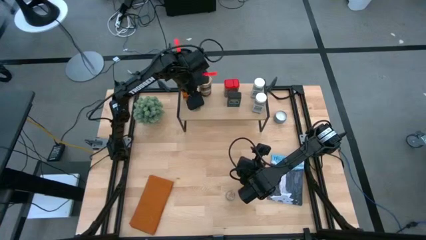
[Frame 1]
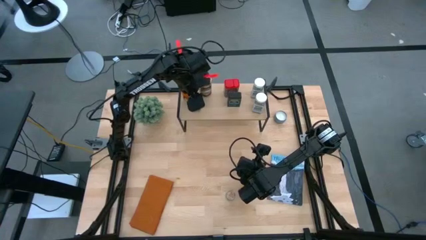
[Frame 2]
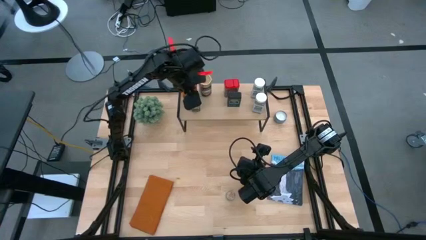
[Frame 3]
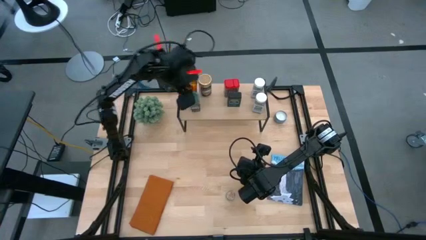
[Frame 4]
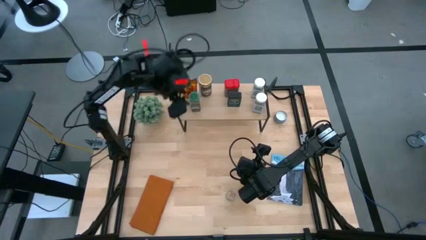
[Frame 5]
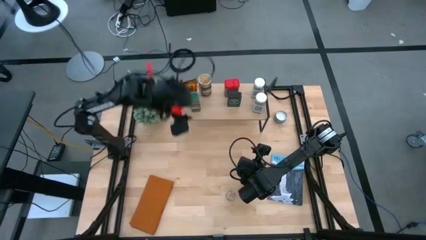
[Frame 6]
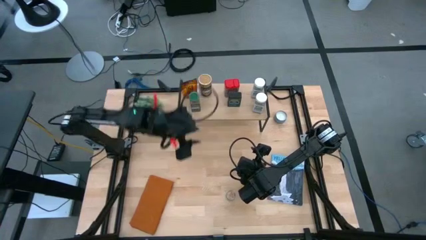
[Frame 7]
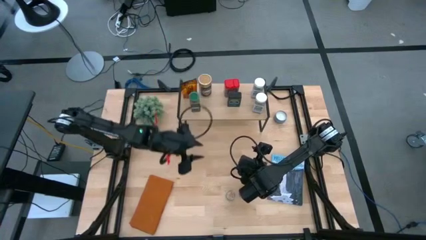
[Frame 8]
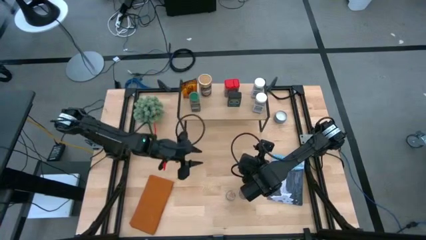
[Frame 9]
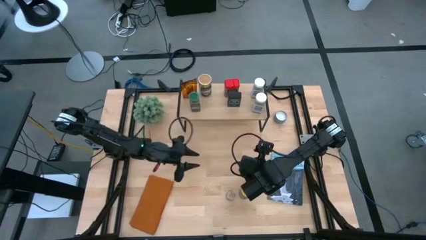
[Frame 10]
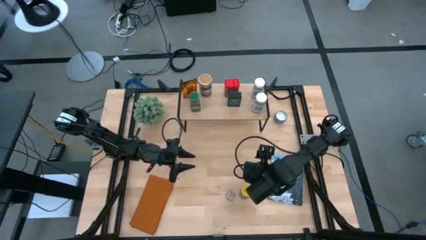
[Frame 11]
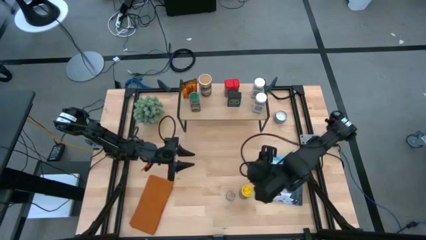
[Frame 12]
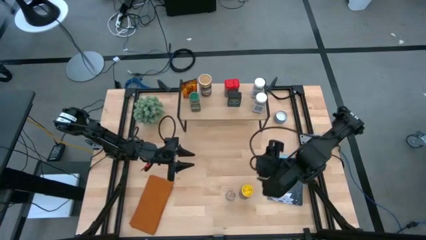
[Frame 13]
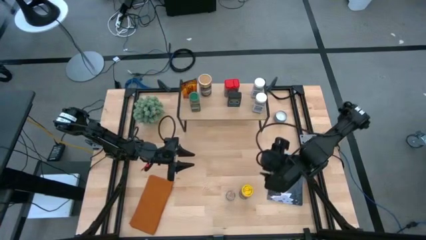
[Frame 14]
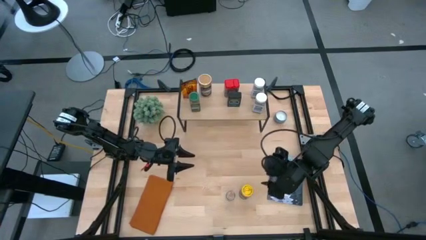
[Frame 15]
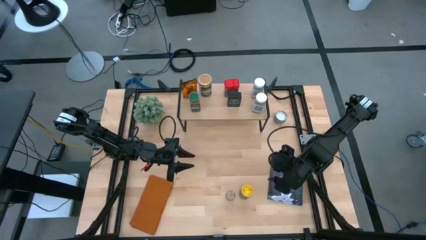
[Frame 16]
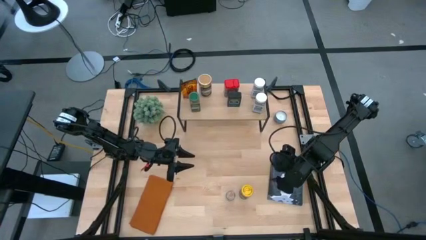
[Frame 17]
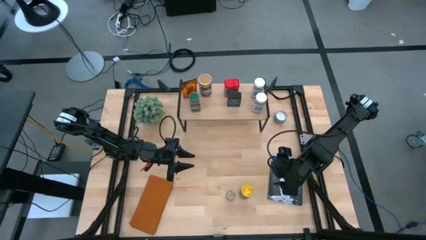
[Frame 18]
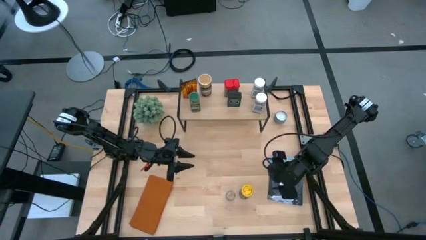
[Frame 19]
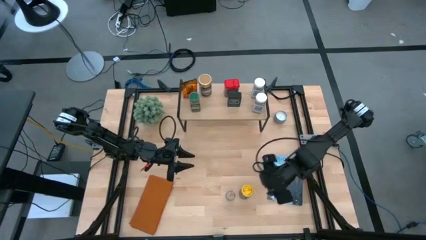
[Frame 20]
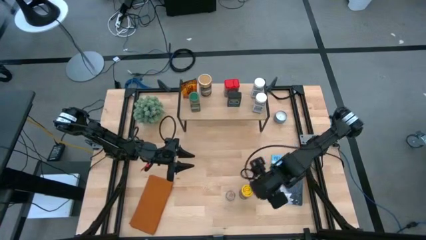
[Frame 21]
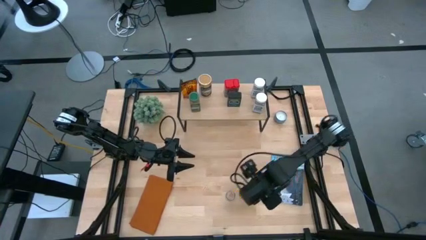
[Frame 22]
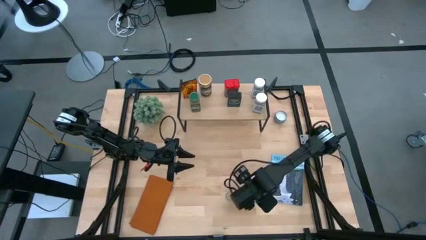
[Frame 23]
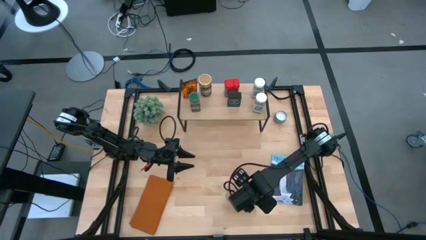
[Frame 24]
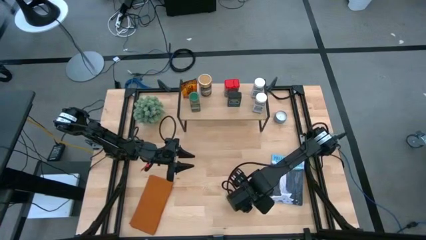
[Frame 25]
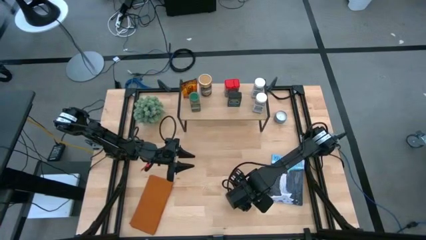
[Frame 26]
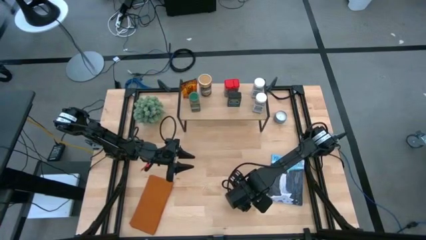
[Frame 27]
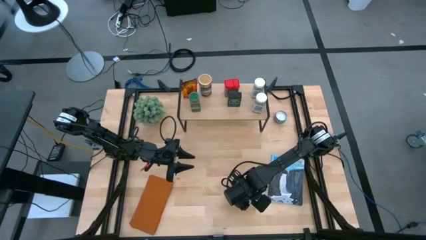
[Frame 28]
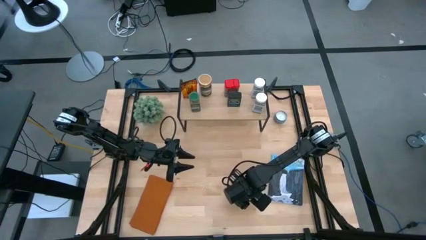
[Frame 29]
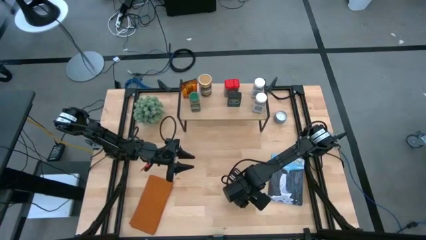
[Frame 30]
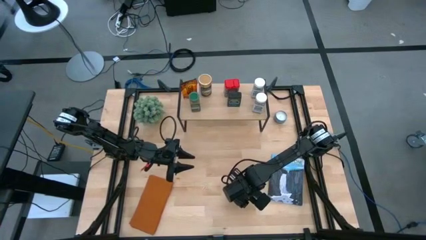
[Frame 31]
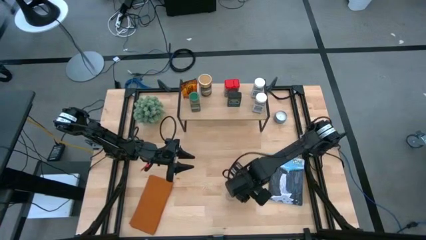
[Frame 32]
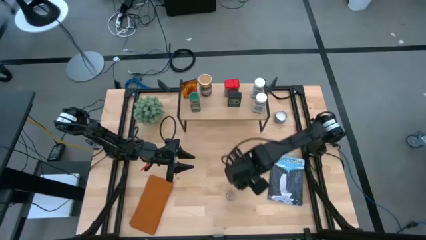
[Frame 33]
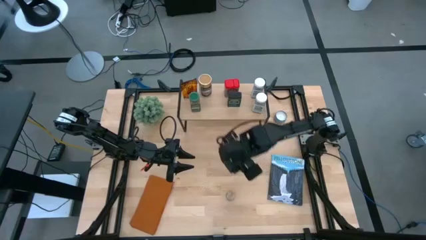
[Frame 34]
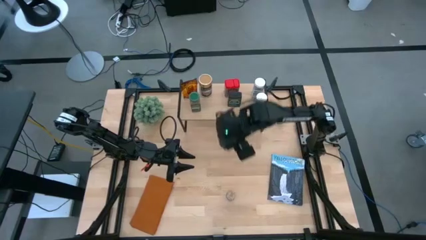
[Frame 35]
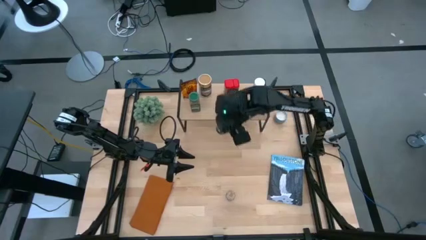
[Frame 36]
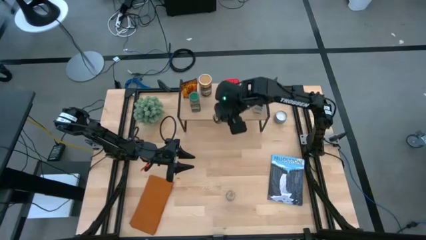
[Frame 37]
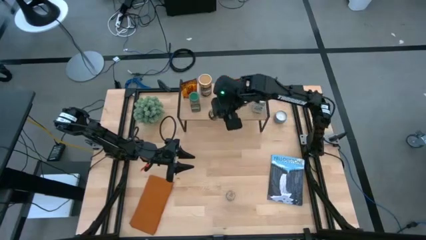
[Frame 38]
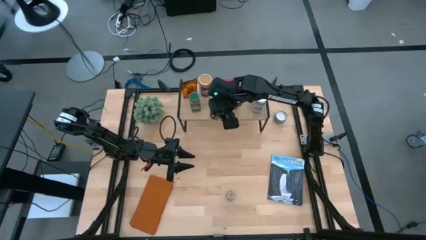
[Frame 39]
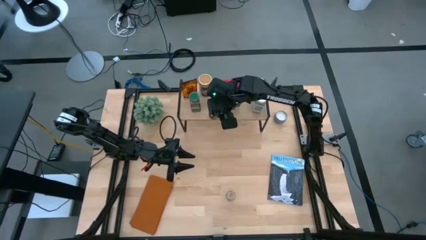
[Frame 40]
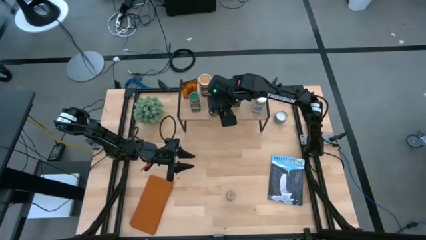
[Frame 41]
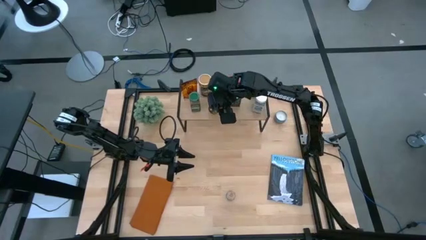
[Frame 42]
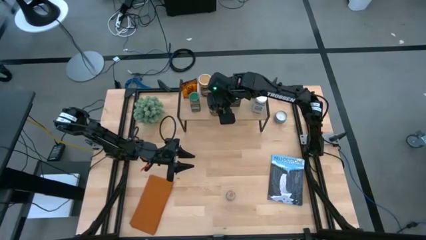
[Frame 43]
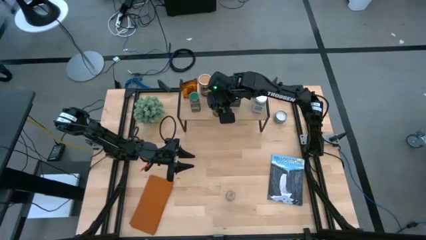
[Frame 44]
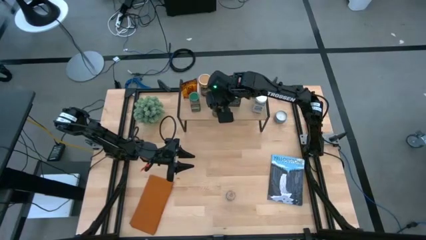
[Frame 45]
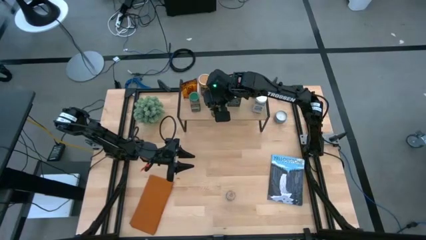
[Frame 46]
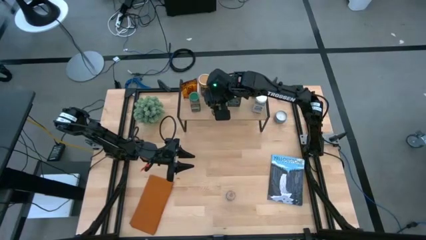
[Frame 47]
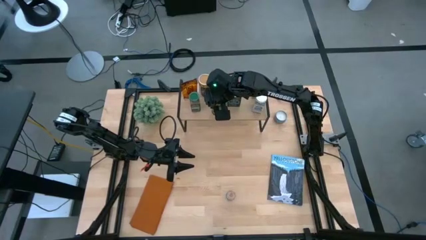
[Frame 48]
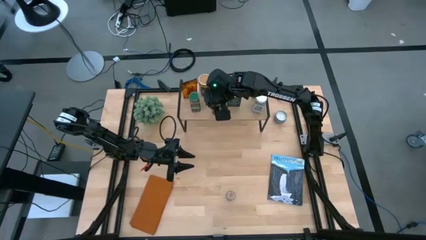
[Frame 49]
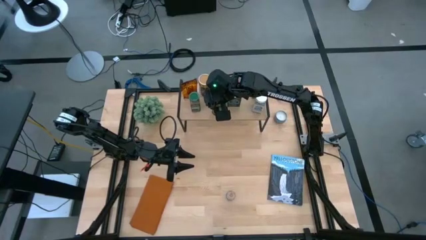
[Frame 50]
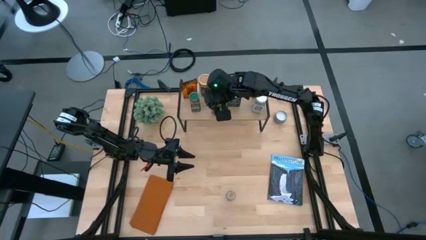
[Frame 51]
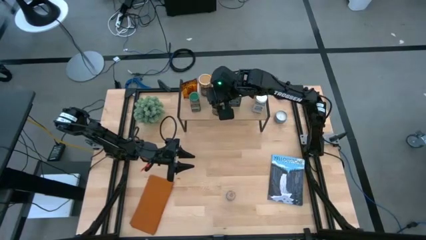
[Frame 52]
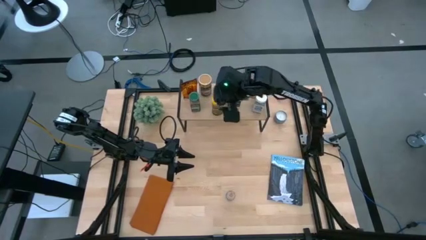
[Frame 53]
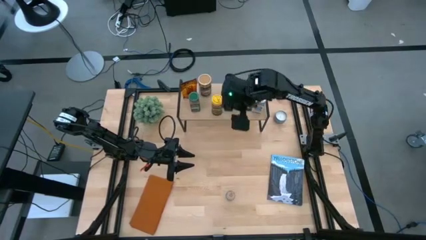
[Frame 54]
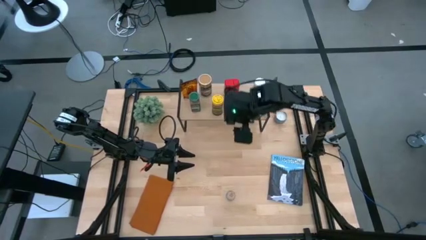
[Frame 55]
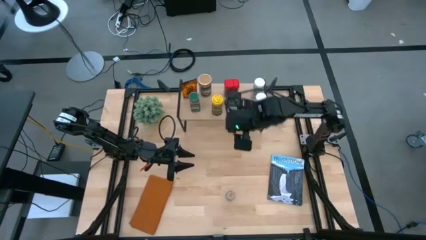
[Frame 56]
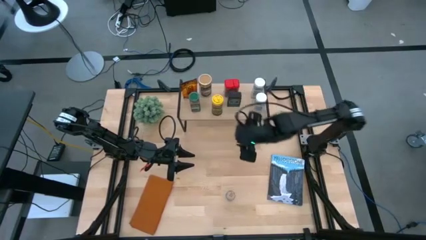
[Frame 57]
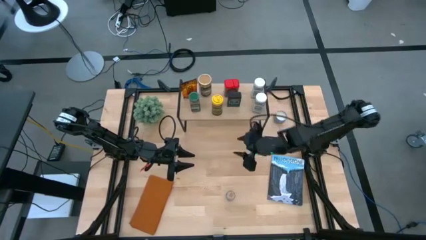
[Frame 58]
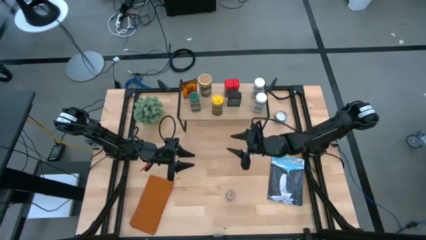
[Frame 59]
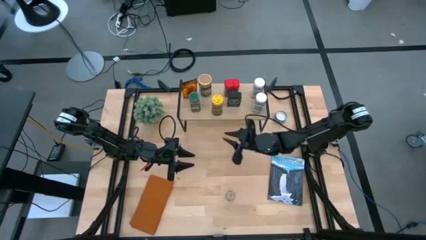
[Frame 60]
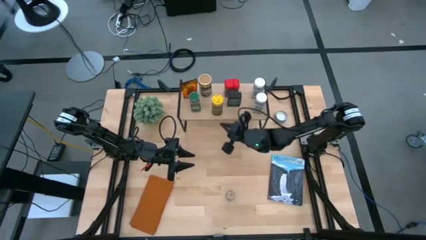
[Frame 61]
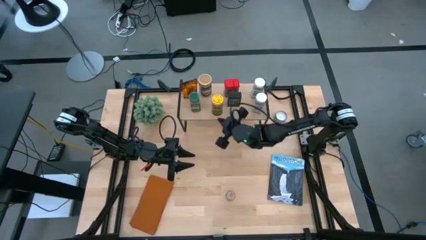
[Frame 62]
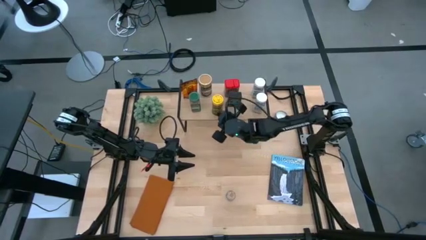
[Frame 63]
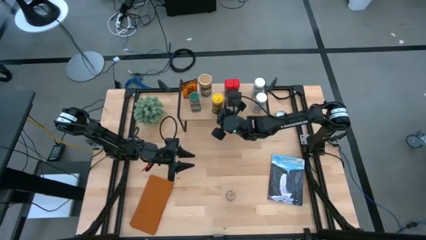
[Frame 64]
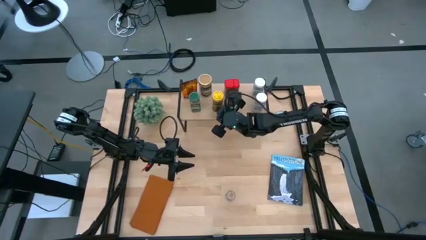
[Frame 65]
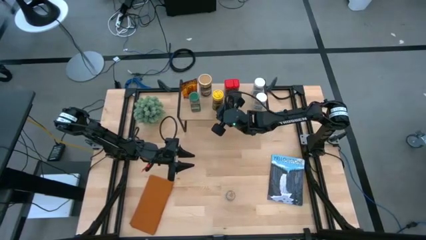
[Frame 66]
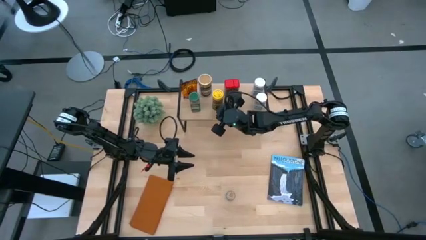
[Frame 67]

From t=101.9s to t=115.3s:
Task: Shelf spices
Put the yellow seasoning bottle on the shelf
